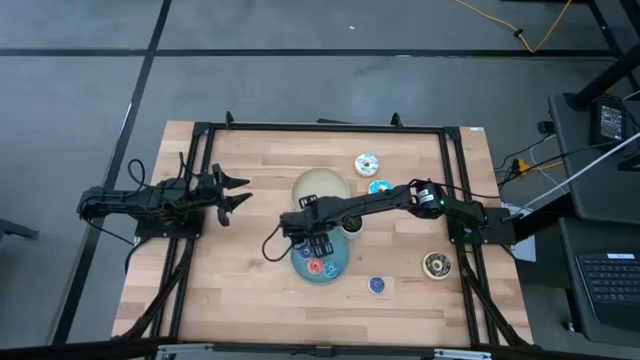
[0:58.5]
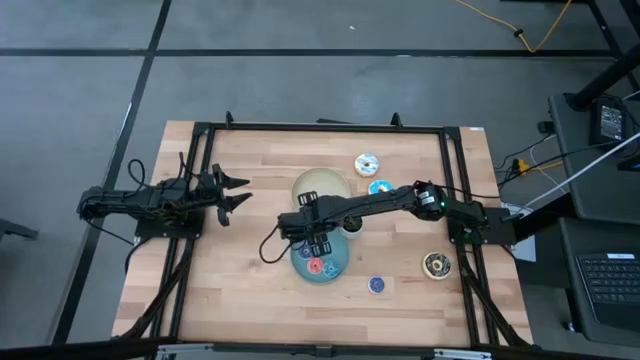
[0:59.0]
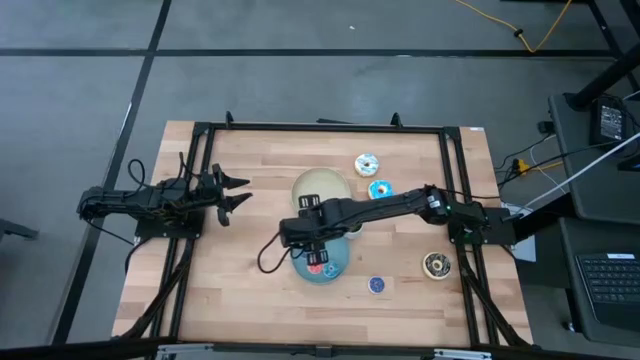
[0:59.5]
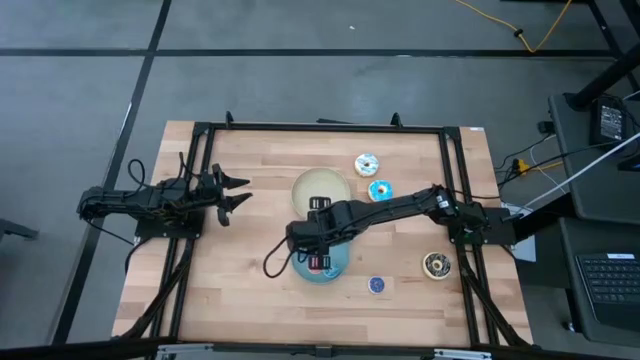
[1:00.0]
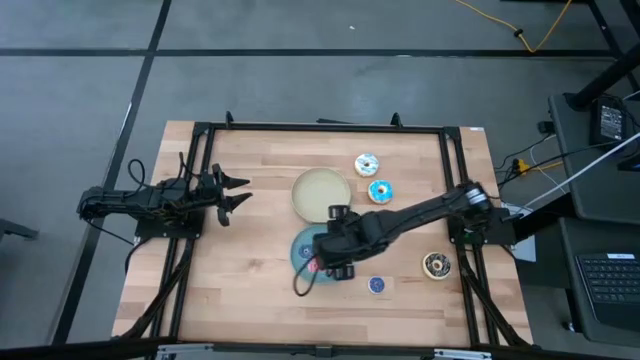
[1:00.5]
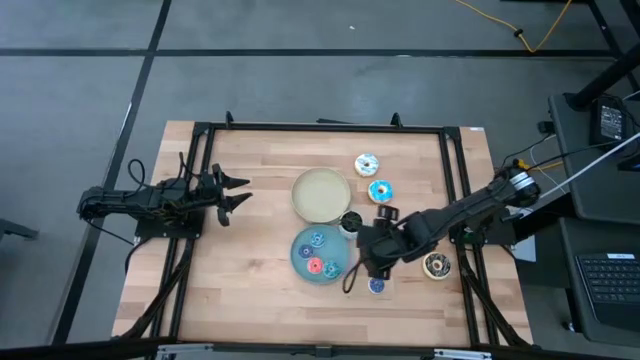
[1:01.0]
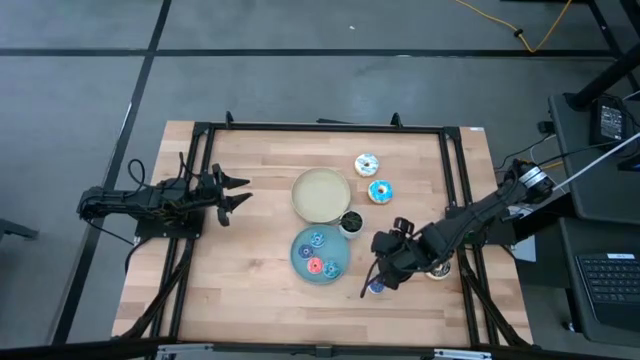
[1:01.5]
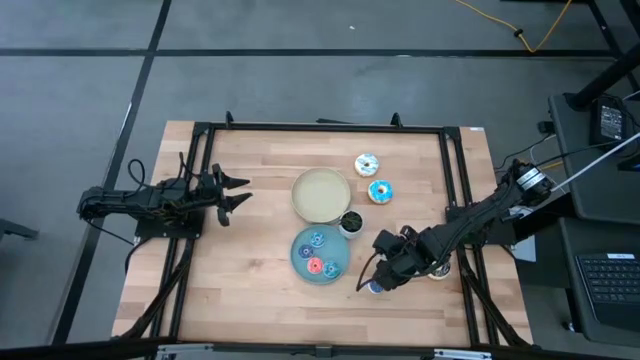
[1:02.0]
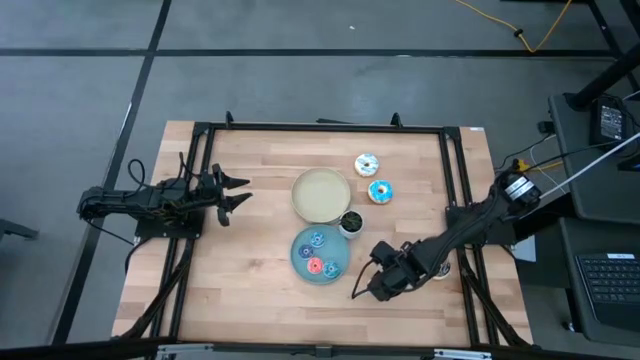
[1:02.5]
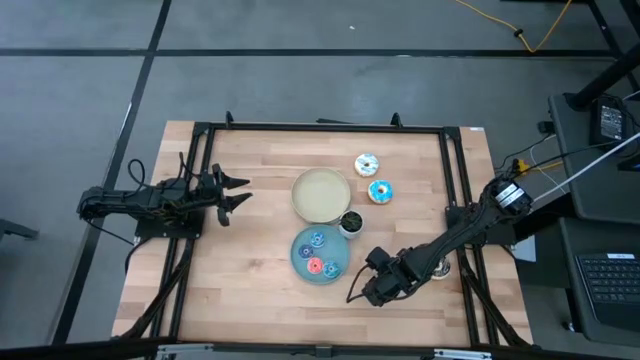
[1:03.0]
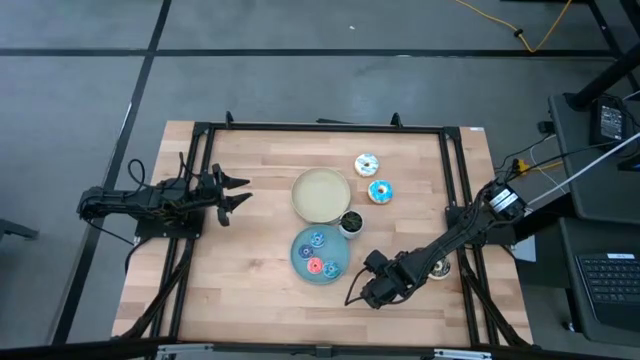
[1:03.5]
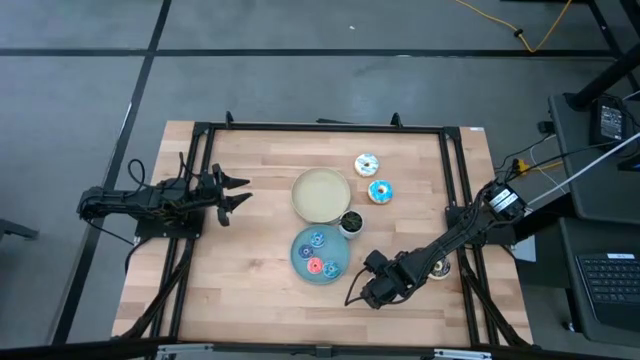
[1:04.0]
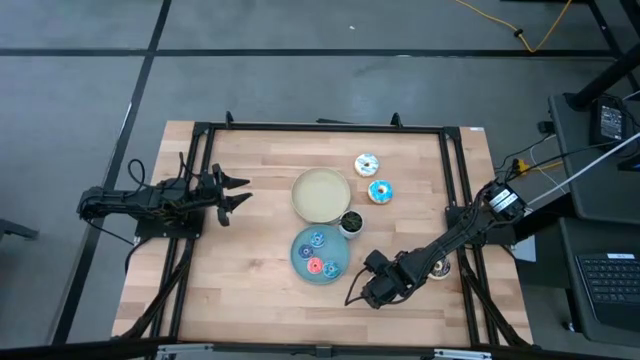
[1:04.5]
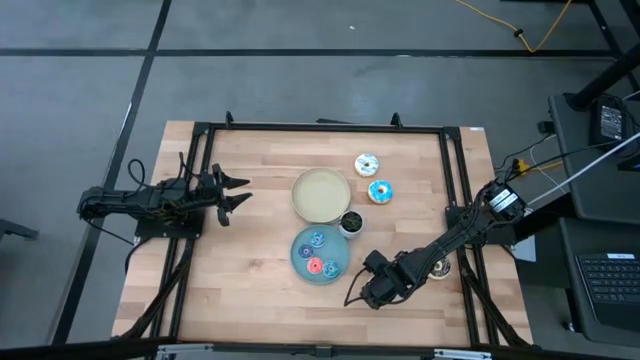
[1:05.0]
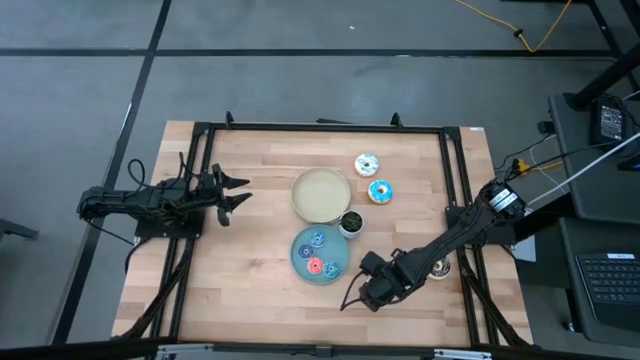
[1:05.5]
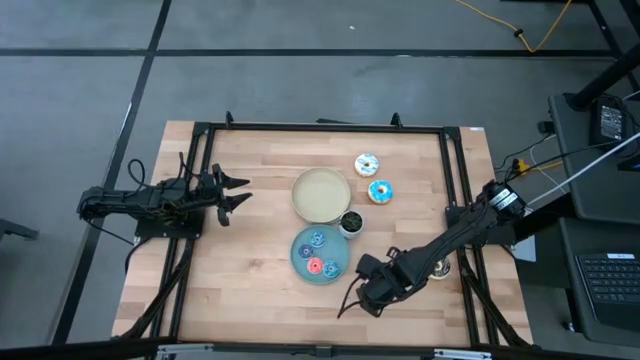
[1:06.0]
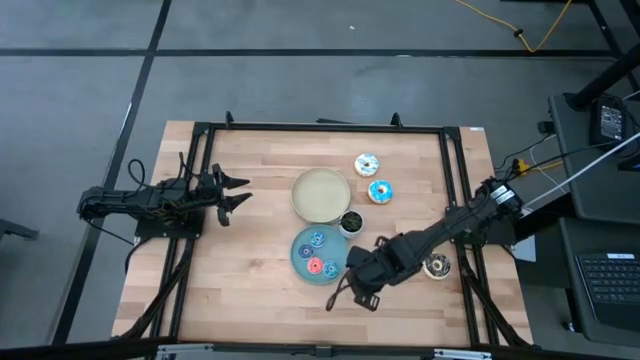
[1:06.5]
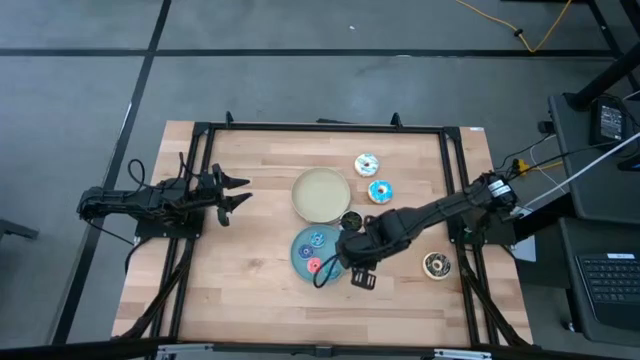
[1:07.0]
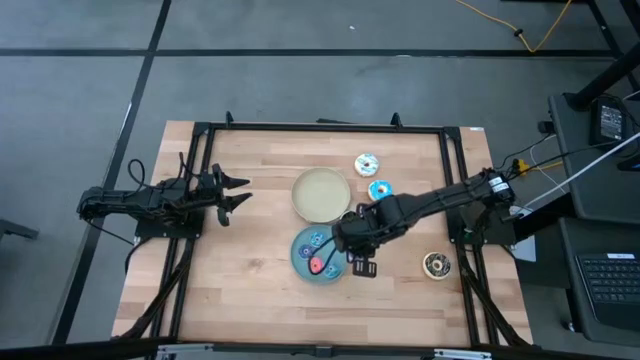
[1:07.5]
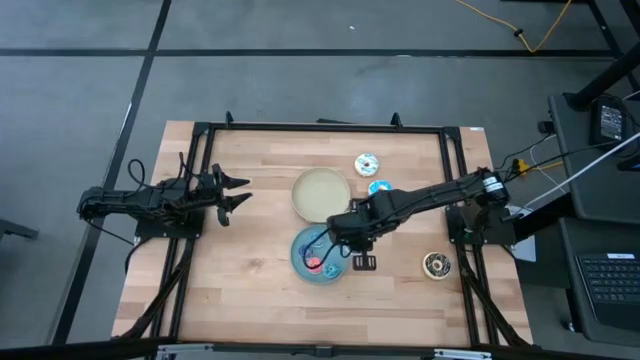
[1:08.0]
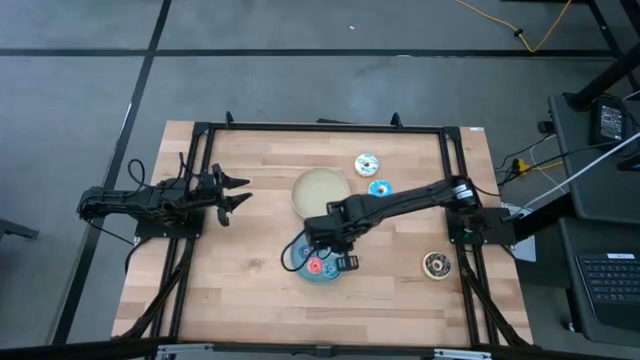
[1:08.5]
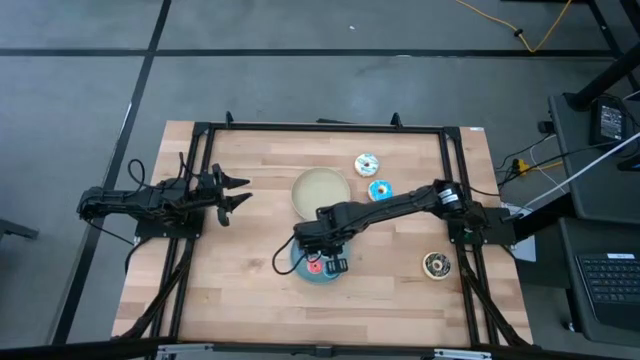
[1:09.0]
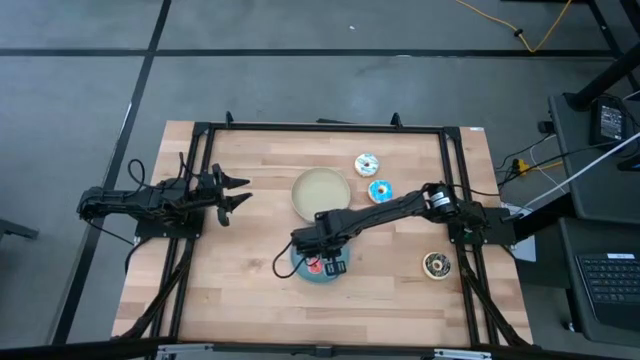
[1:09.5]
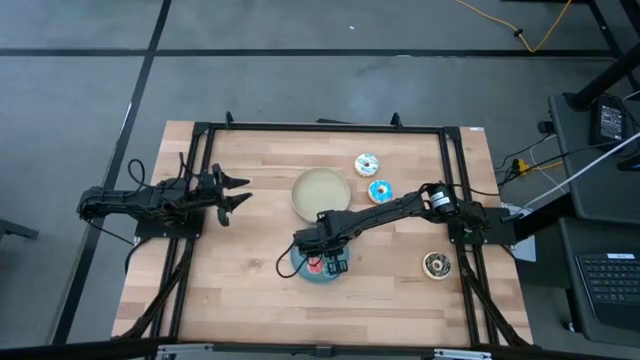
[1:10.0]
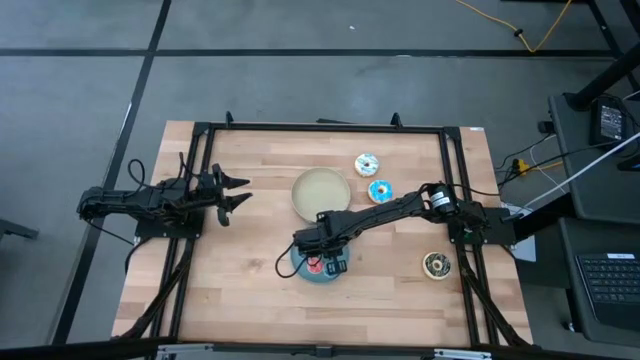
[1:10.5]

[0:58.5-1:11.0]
Task: Pick & Place donuts
Put the small dark blue donut on the blue plate

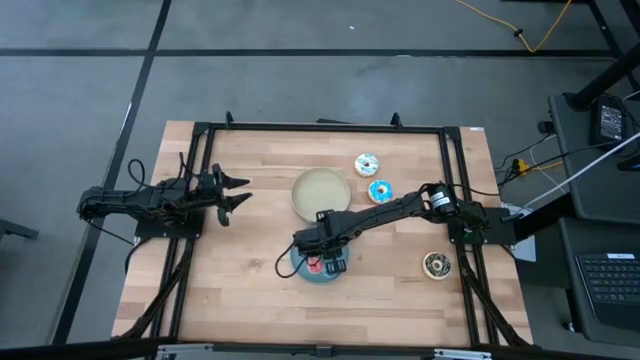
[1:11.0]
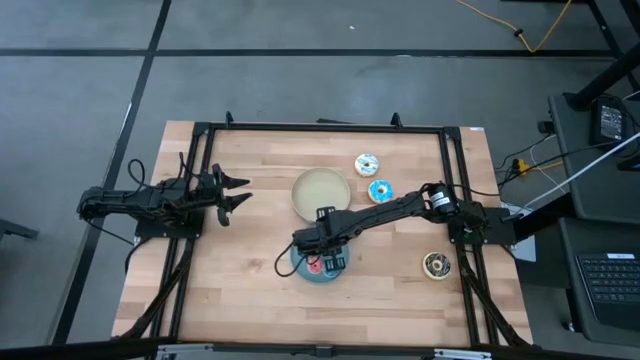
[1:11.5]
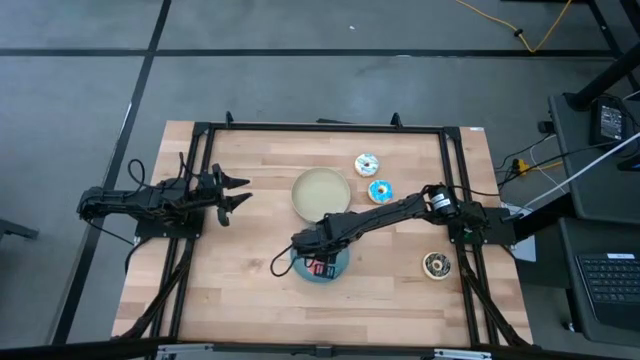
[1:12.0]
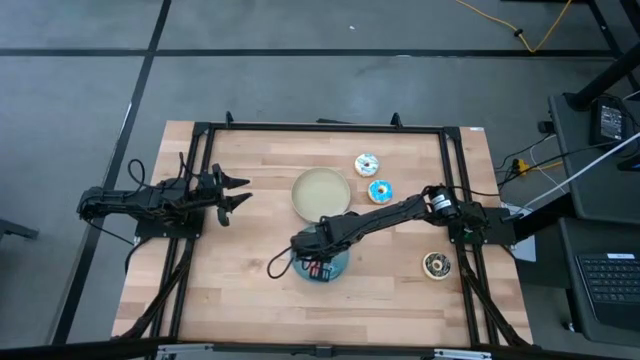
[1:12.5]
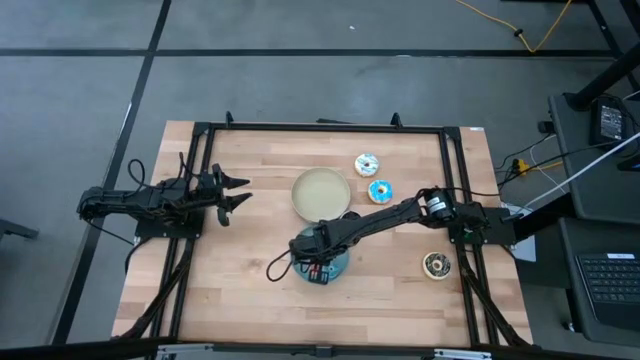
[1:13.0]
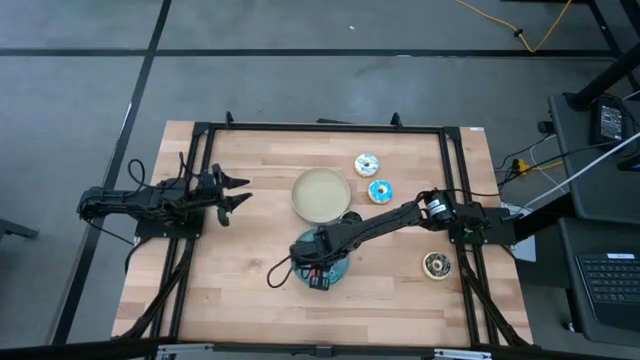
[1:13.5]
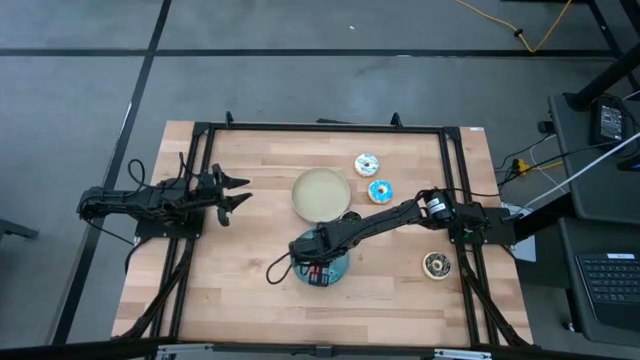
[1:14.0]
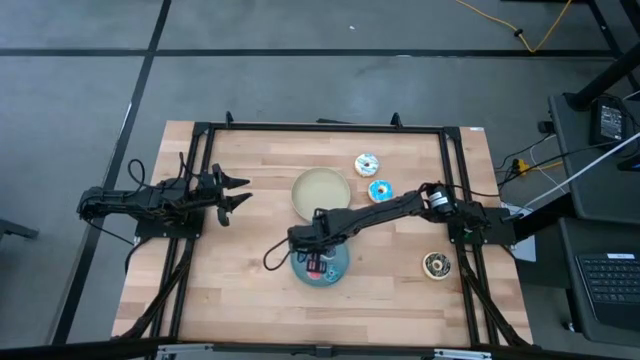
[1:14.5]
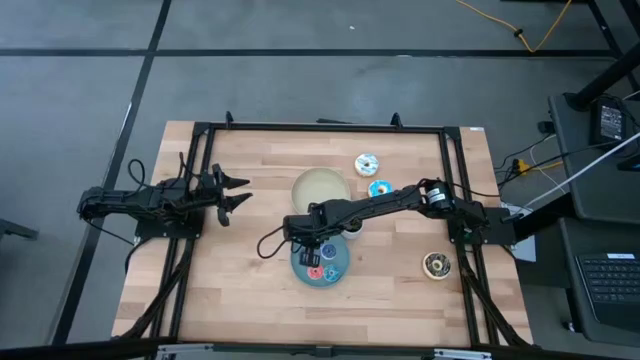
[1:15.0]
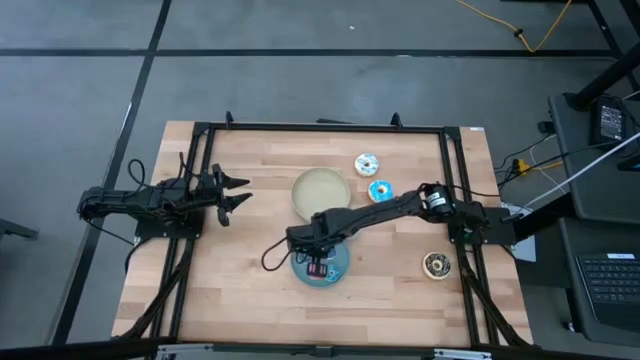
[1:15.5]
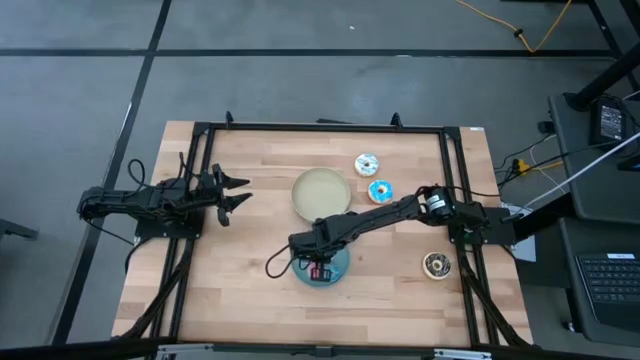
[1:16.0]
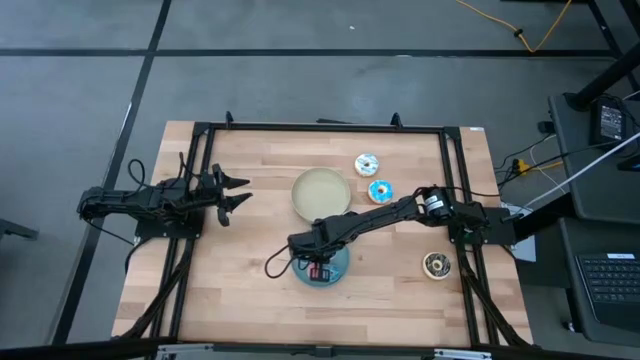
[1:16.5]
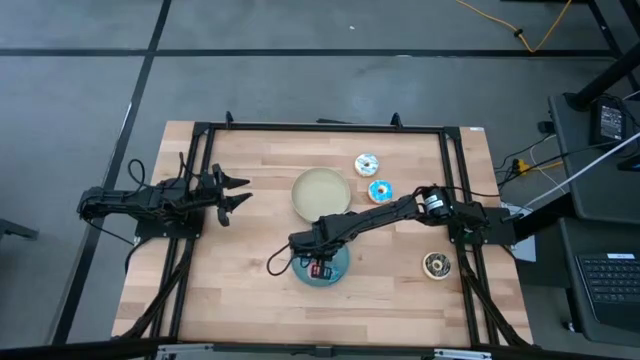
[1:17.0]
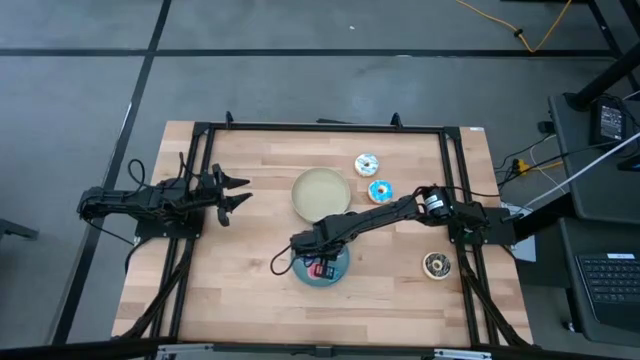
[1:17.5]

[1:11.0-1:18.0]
Adjust the small donuts on the blue plate

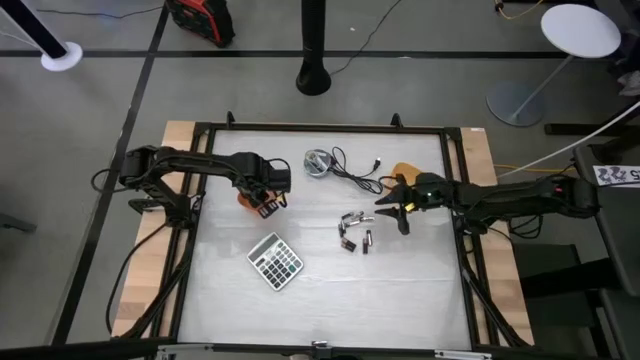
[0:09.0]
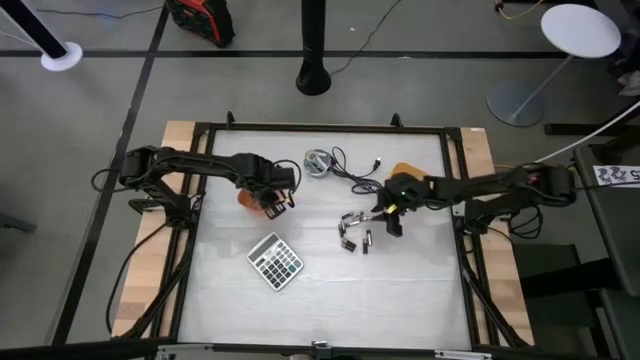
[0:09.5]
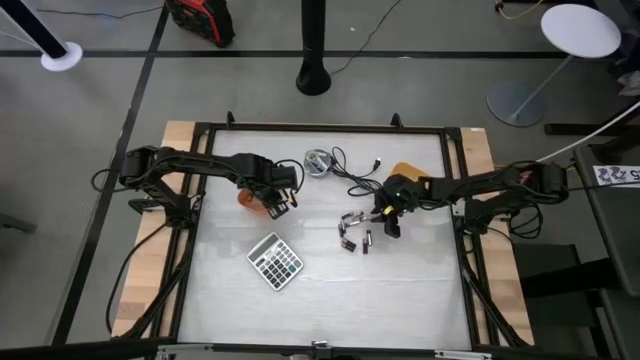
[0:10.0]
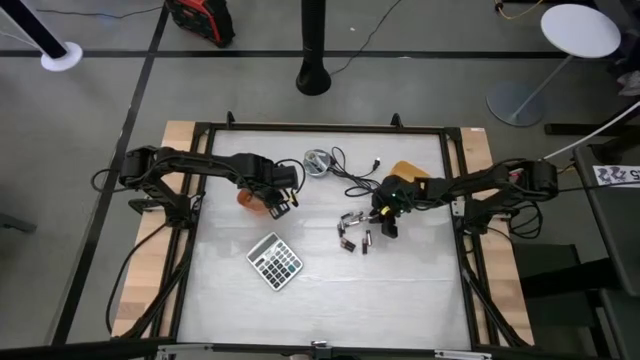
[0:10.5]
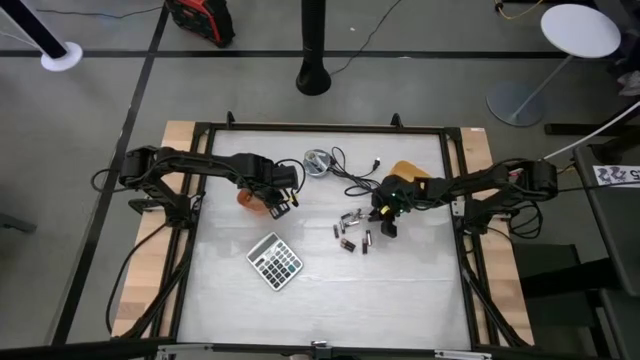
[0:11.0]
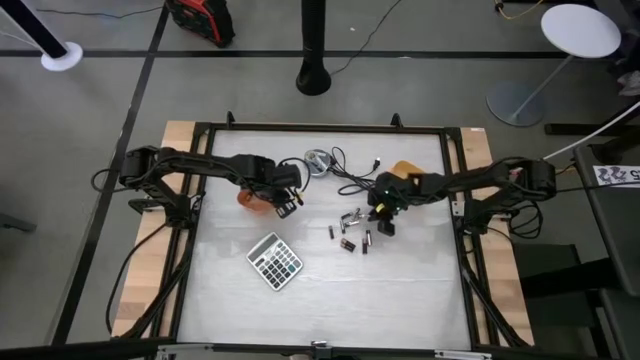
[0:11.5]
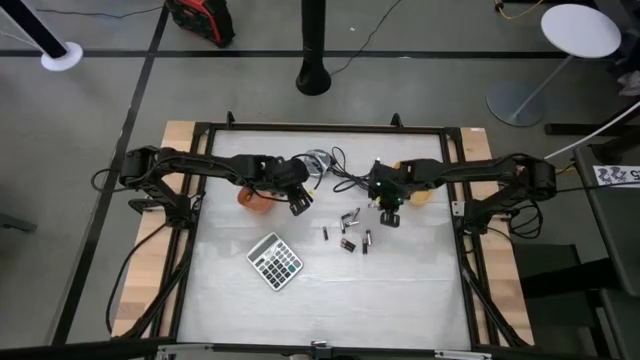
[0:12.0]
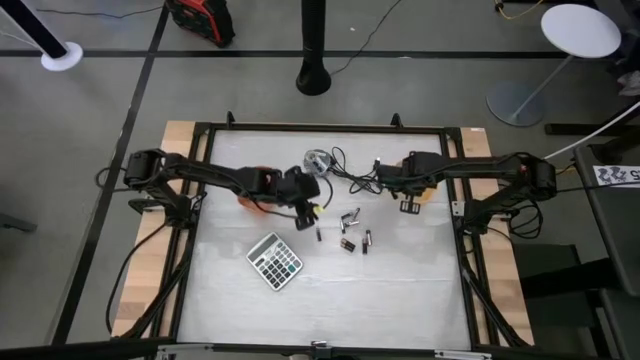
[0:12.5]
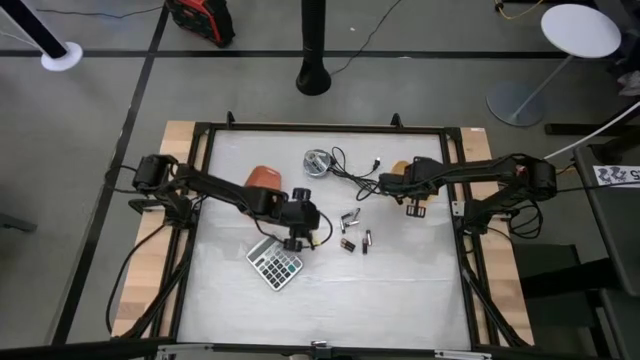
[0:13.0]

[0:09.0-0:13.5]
Task: Sort batteries
Put the silver battery into the yellow bin
